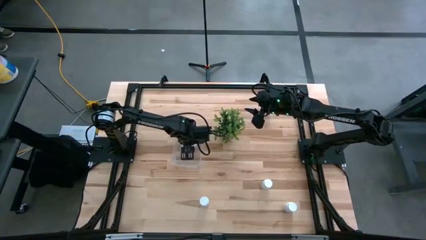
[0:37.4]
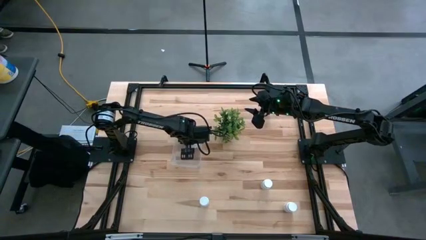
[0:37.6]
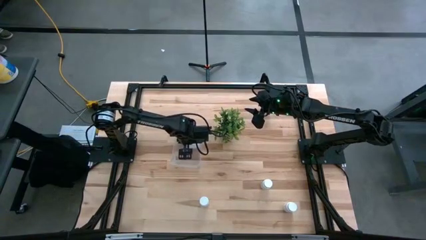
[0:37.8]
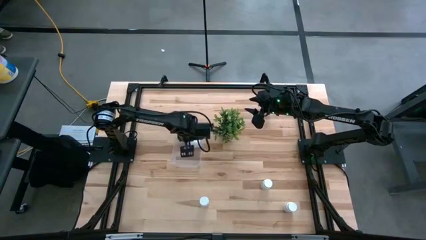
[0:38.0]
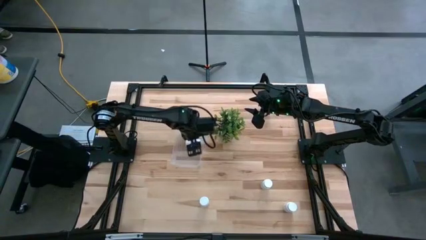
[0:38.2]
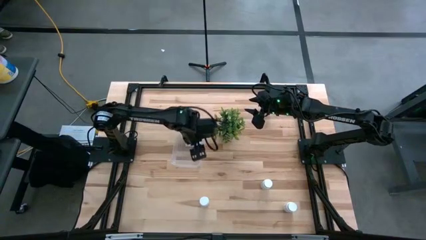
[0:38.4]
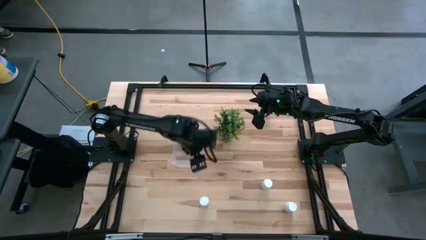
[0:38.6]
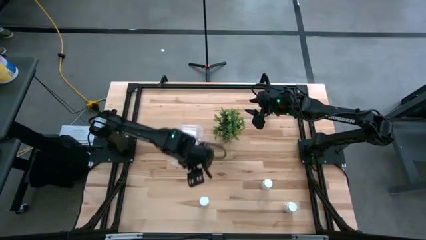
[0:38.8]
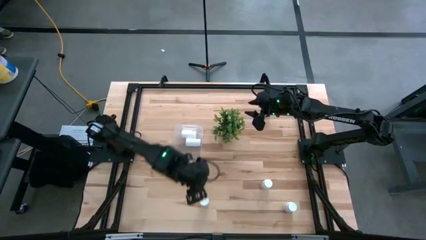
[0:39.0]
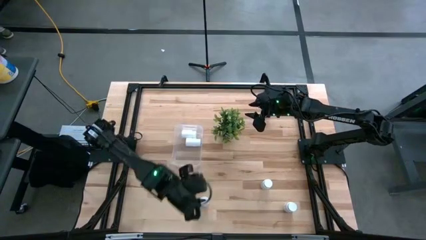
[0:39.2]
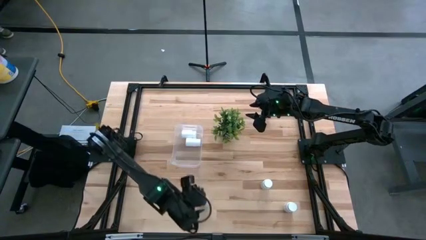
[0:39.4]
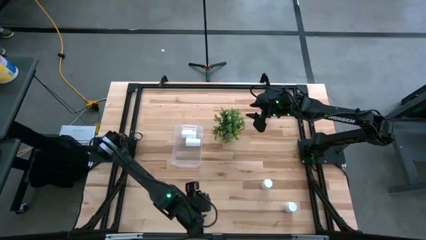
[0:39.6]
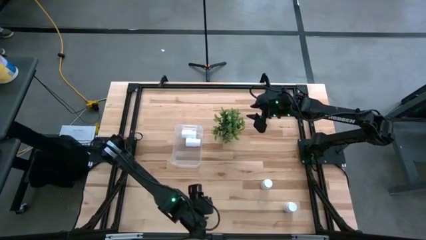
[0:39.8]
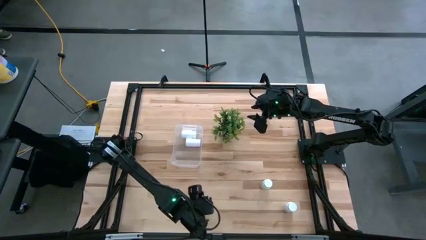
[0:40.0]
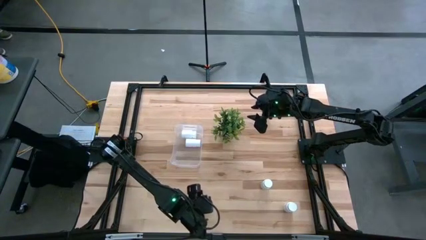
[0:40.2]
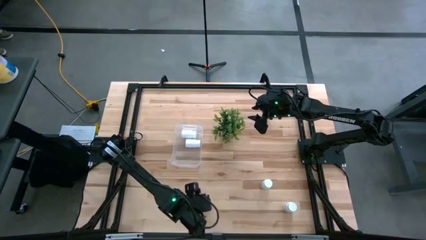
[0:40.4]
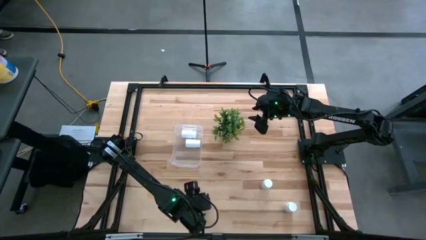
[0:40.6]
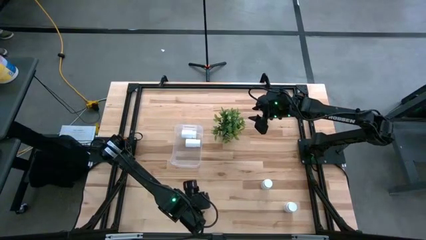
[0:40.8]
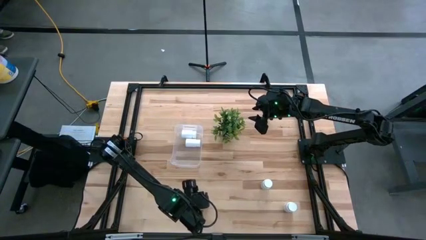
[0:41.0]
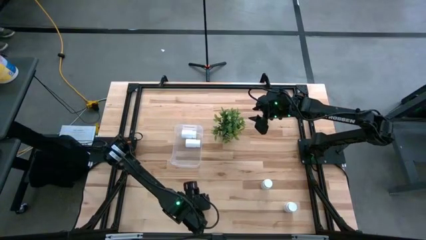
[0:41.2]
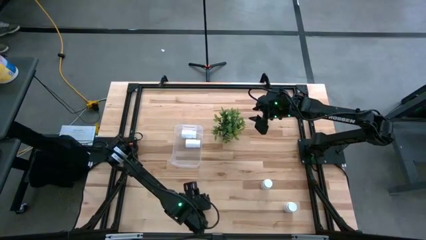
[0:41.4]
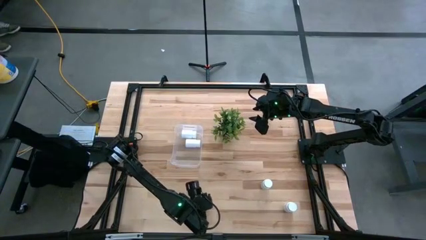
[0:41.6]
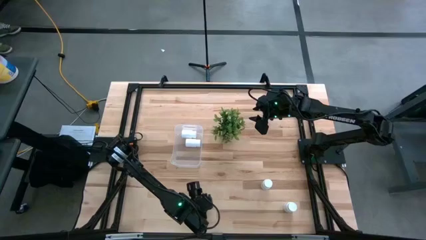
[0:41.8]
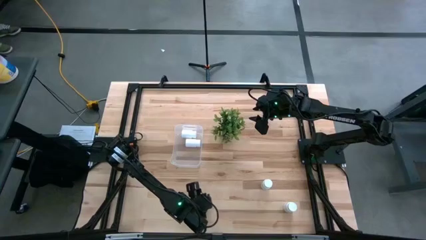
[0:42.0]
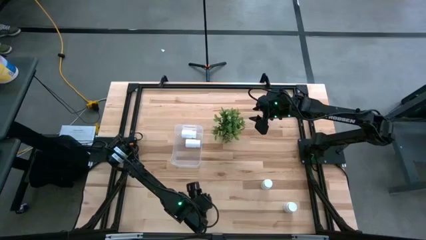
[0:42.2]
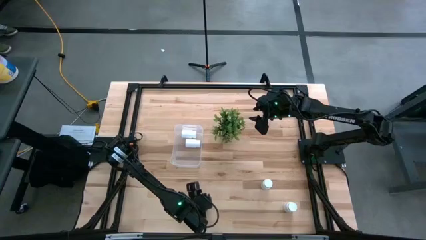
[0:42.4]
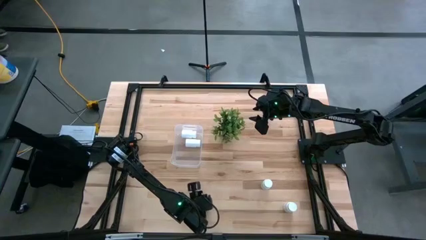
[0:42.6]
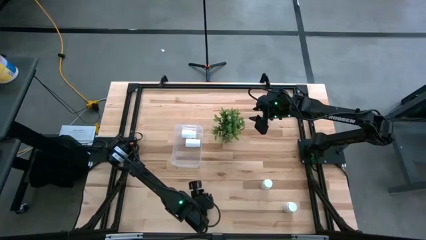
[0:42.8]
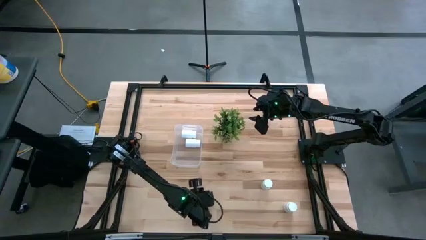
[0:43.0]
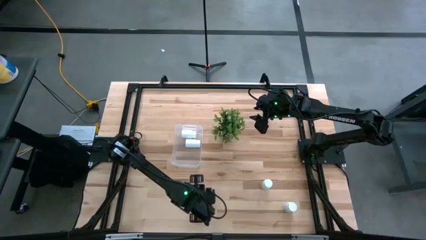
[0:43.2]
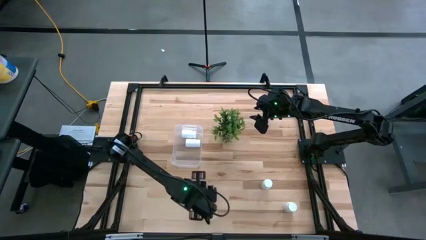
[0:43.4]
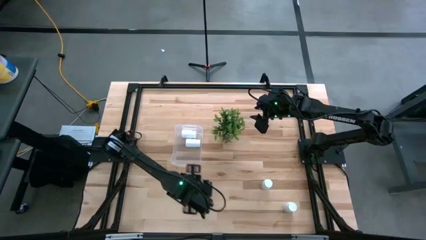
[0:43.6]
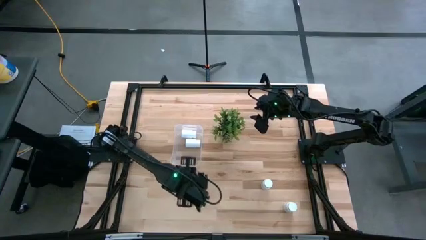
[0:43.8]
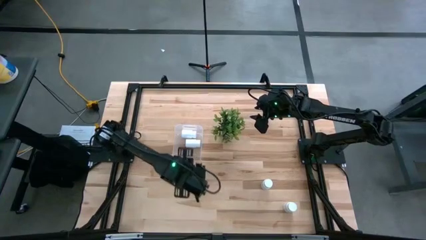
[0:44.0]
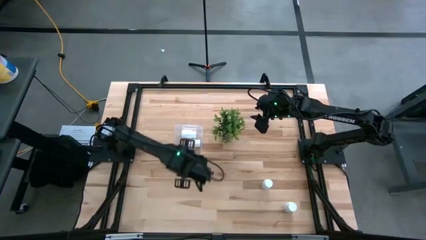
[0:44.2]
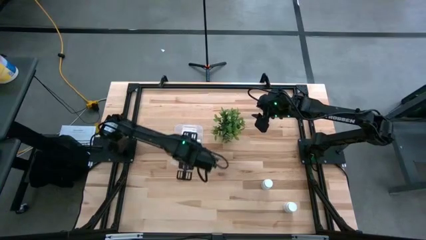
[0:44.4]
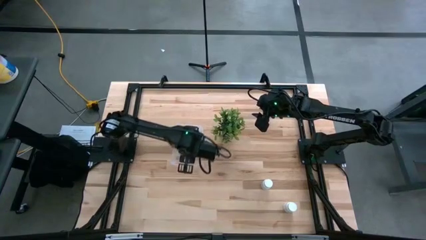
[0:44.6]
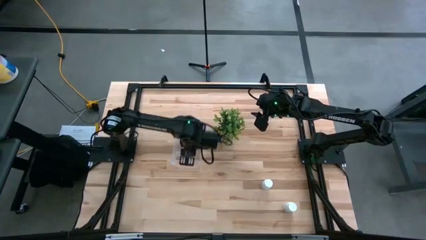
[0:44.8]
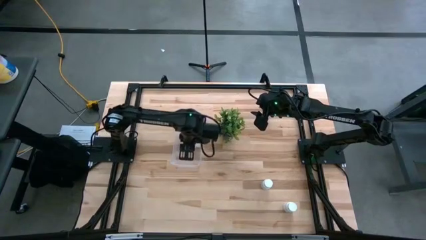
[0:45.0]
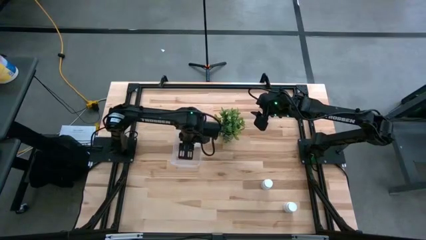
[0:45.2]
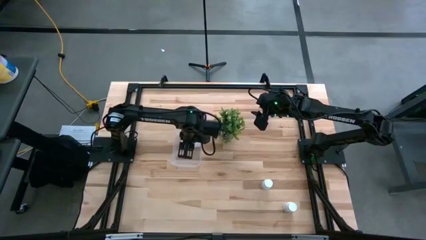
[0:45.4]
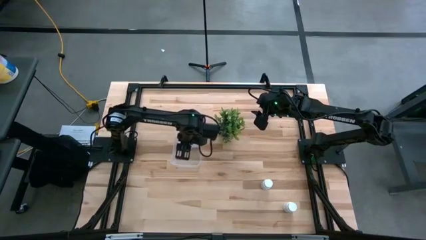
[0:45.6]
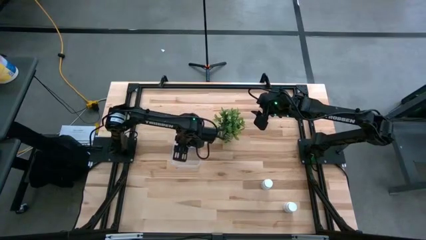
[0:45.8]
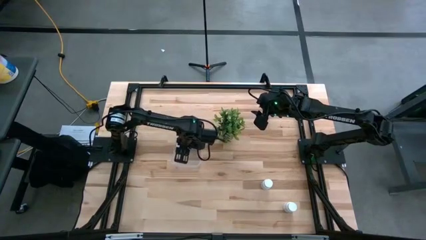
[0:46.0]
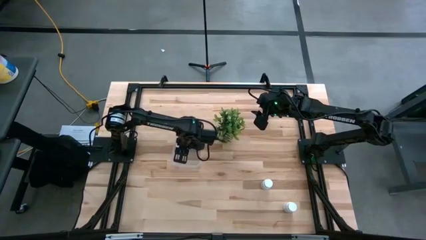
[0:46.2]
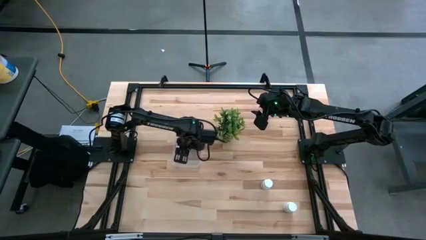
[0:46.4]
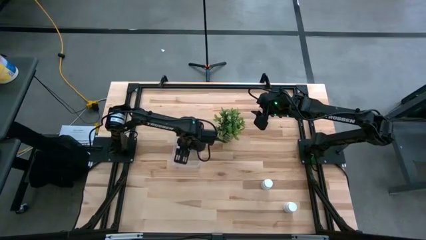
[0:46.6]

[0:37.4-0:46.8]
Task: Pick and place pill bottles into a basket
Put the white pill bottle into the transparent bin

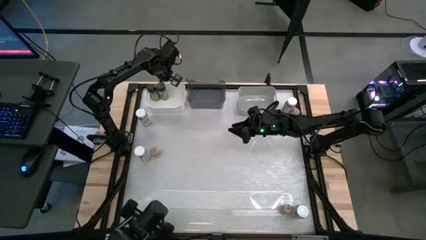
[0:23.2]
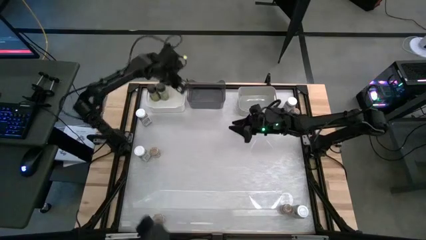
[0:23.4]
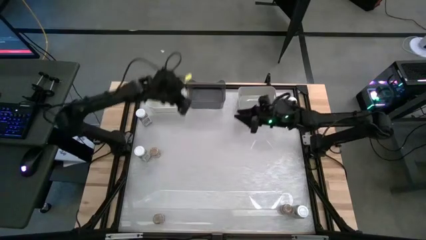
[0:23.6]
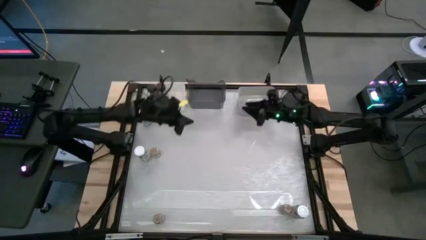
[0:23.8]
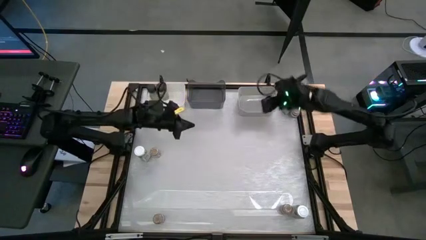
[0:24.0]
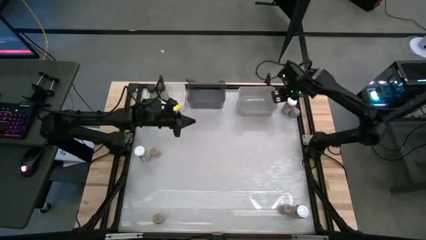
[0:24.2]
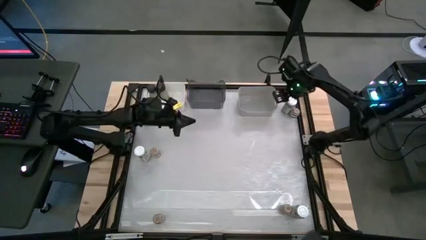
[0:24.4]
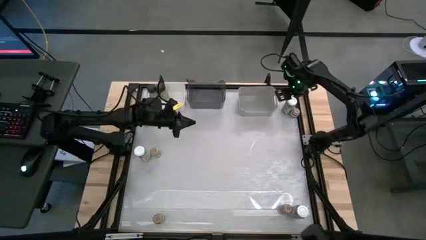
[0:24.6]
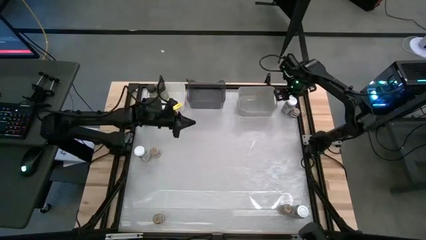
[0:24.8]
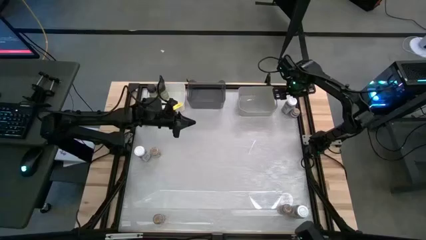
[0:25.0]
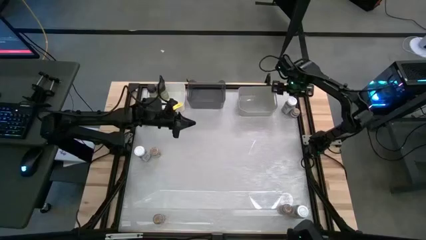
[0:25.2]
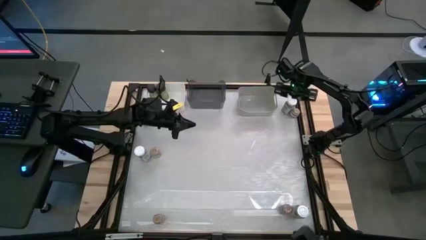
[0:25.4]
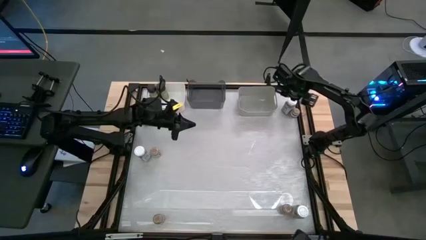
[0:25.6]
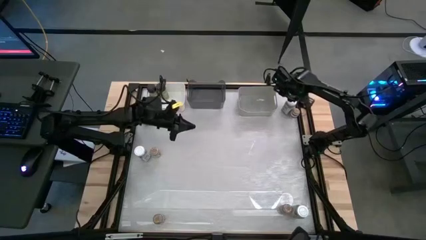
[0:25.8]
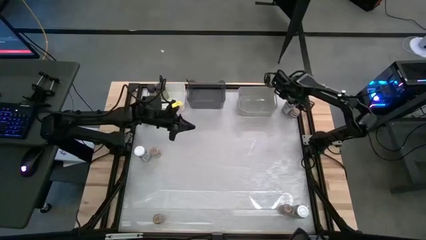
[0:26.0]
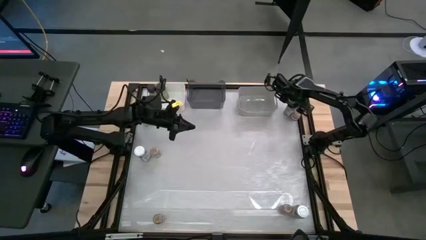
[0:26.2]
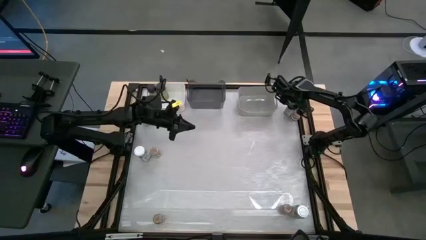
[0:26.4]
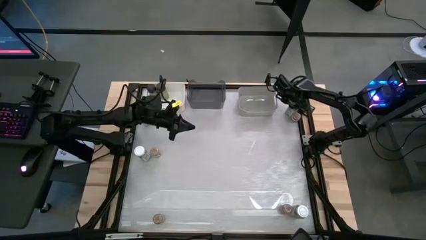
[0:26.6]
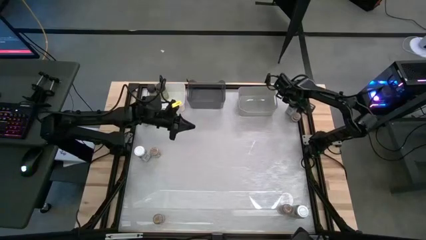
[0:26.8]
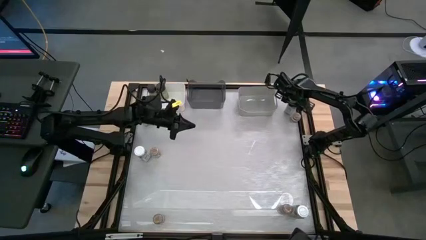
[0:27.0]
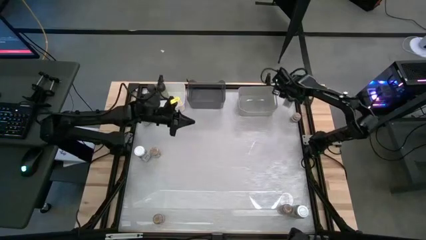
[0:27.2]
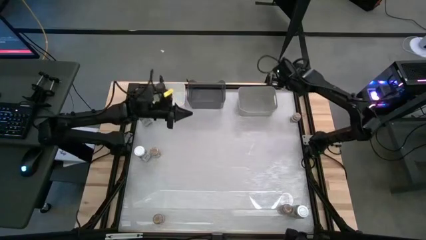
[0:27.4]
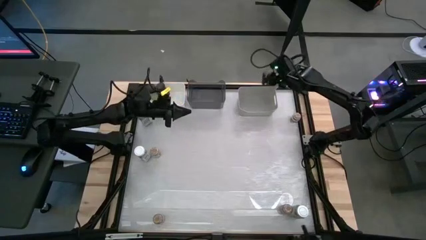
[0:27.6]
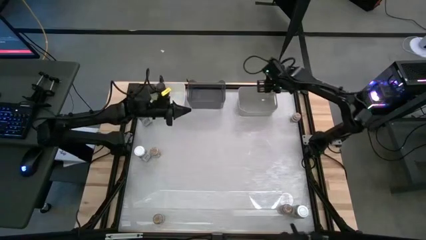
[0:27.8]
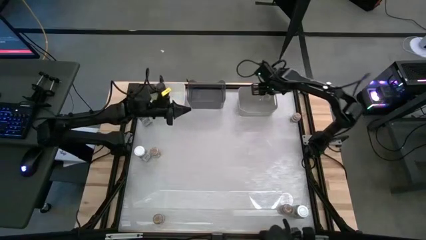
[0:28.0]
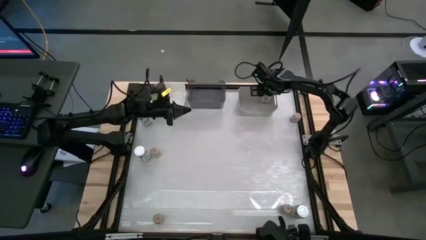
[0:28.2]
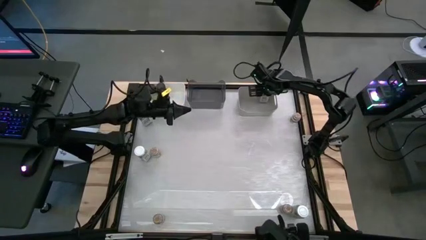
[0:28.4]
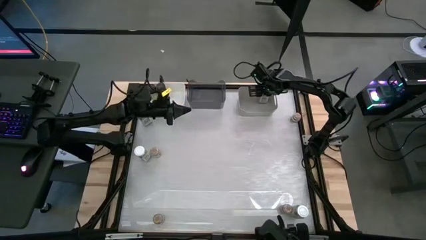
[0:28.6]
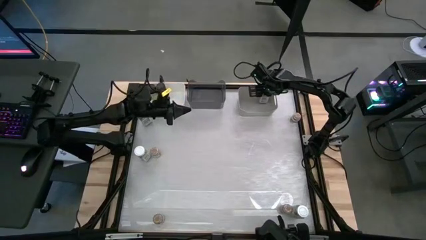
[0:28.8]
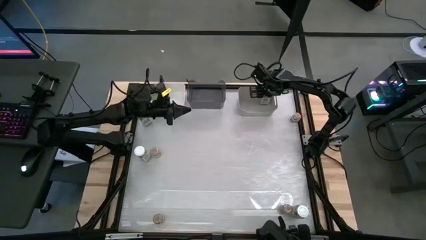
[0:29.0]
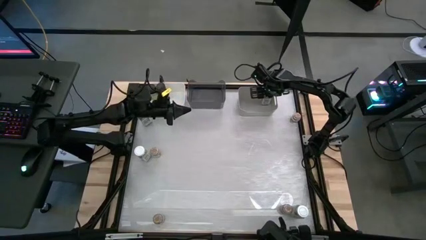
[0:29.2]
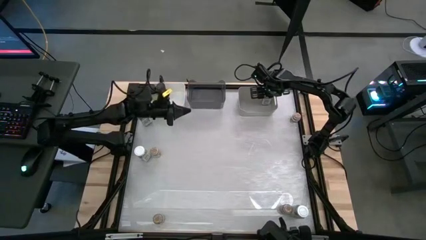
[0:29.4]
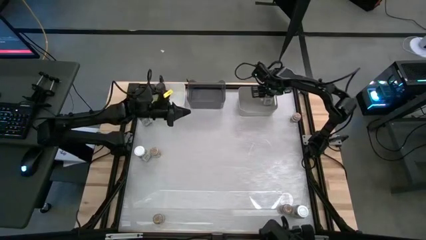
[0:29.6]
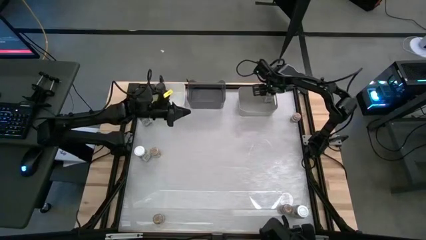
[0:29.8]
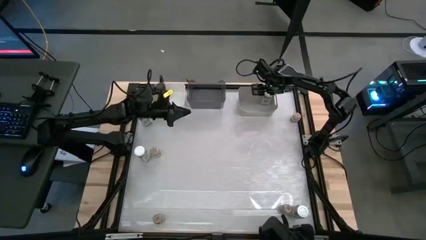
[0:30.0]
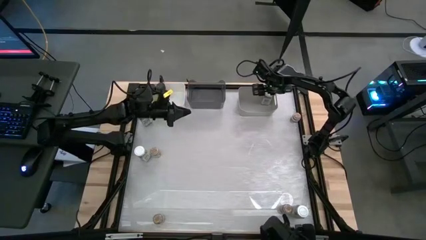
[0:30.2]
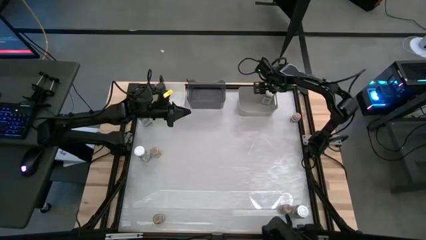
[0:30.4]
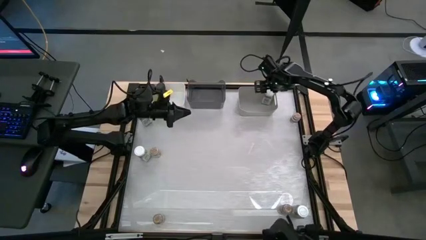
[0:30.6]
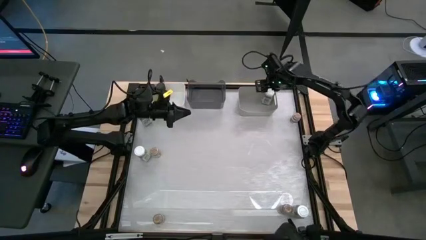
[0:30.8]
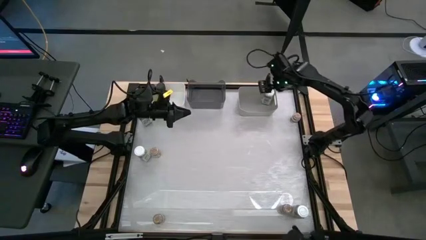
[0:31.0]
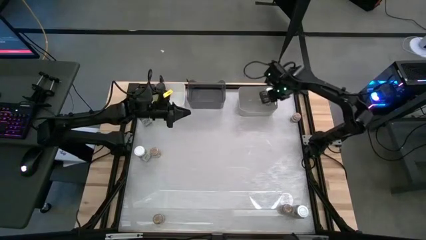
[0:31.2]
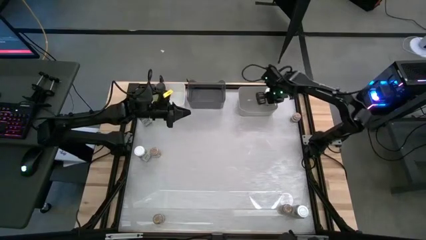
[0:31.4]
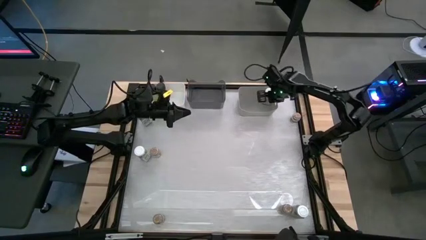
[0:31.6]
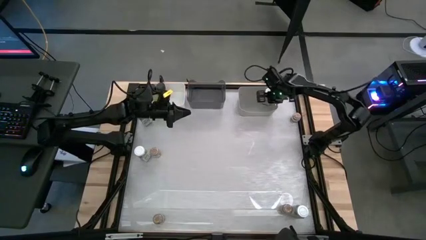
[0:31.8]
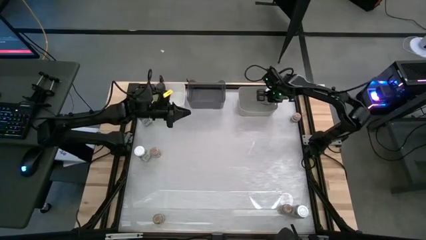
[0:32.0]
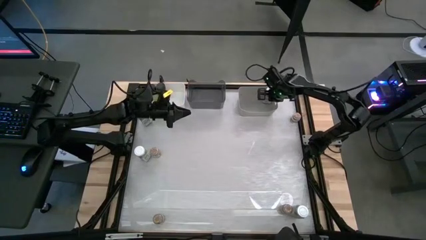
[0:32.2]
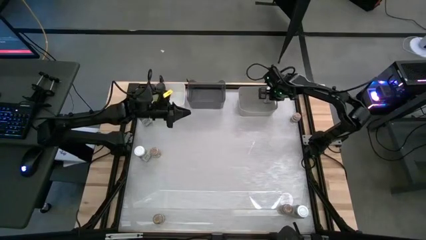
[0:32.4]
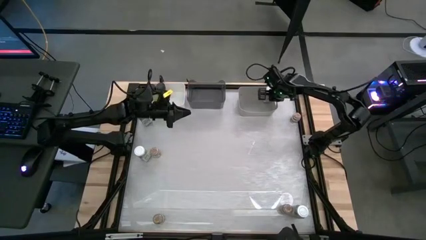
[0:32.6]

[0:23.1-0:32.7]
Task: Sort spices by type
Put the top right white seasoning bottle into the gray bin
